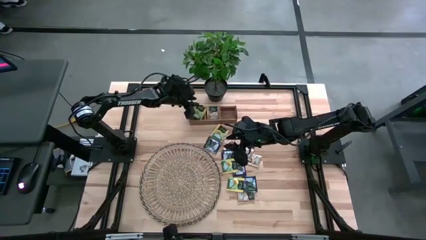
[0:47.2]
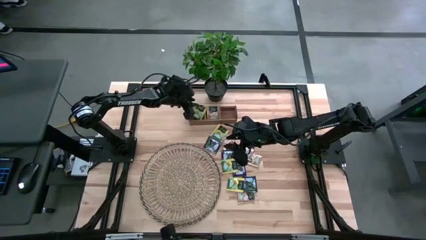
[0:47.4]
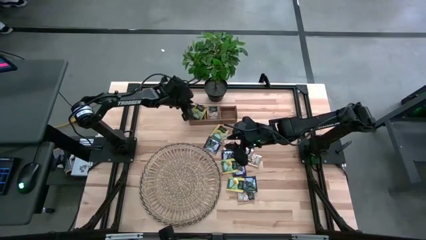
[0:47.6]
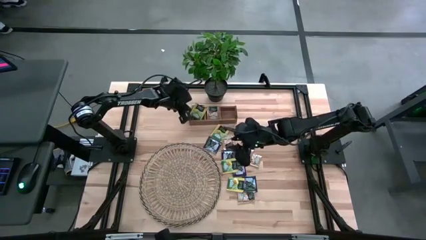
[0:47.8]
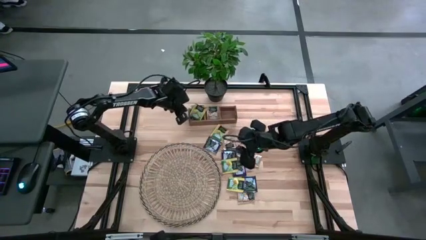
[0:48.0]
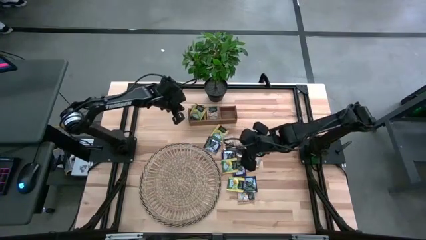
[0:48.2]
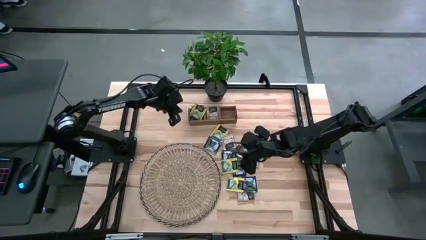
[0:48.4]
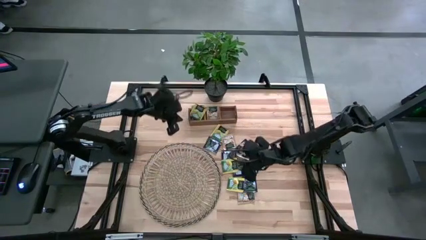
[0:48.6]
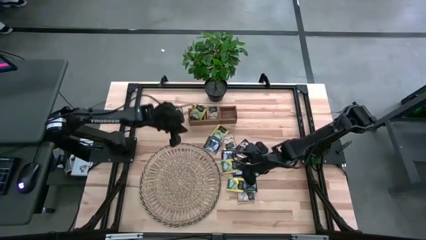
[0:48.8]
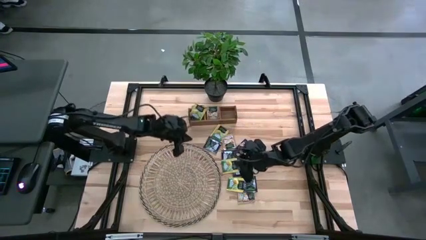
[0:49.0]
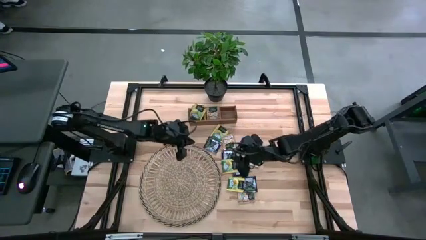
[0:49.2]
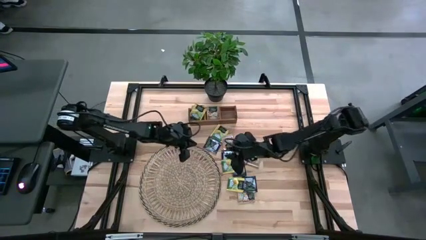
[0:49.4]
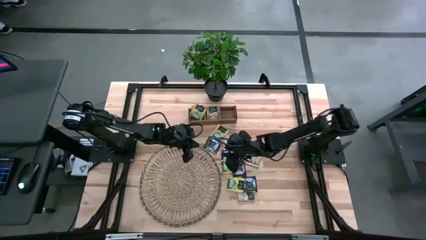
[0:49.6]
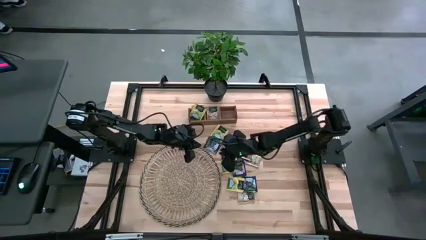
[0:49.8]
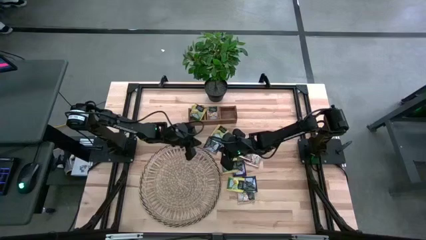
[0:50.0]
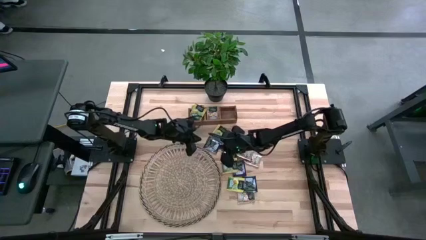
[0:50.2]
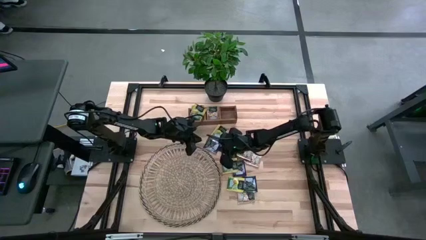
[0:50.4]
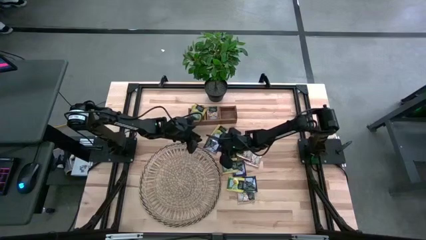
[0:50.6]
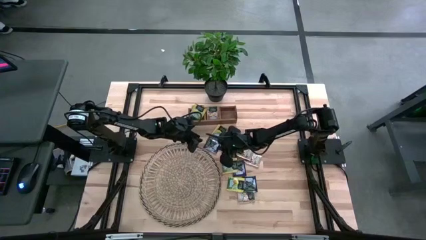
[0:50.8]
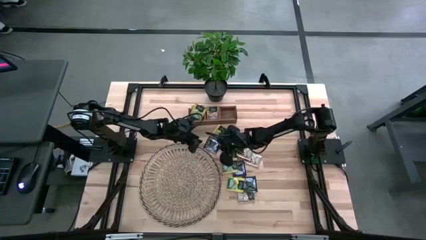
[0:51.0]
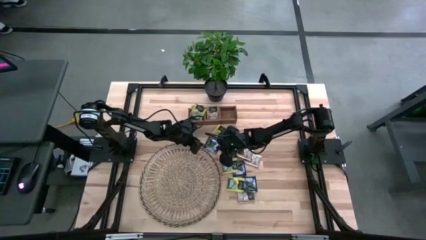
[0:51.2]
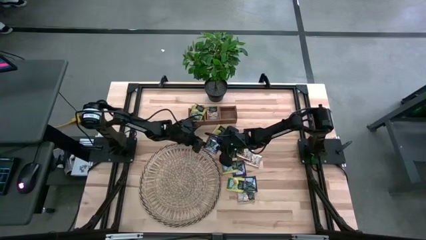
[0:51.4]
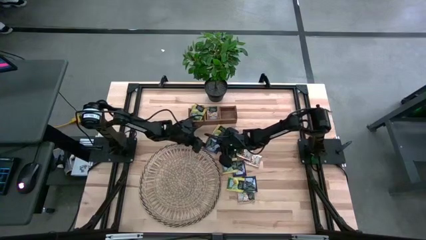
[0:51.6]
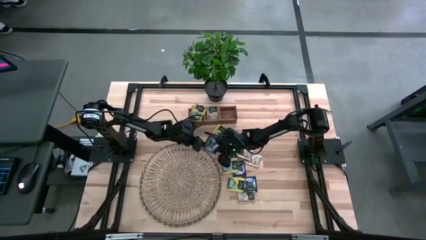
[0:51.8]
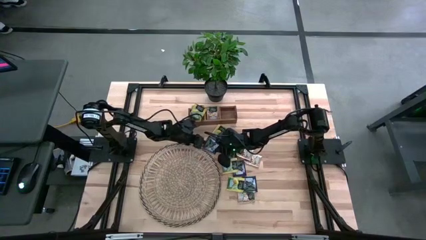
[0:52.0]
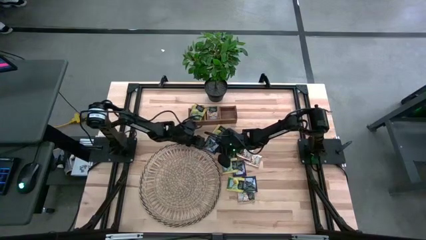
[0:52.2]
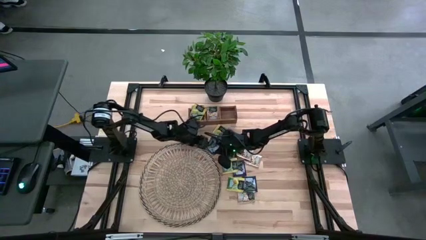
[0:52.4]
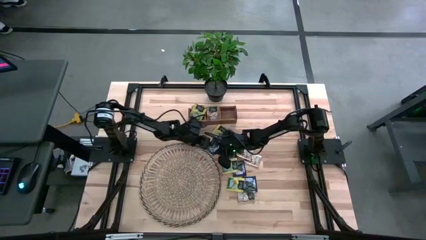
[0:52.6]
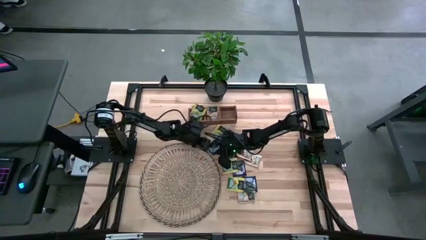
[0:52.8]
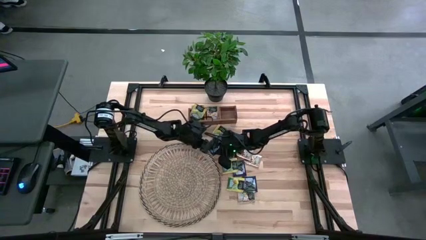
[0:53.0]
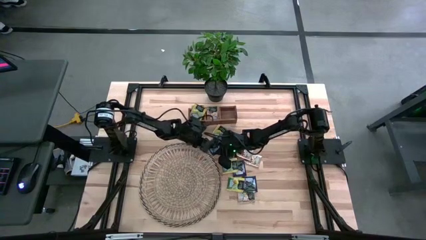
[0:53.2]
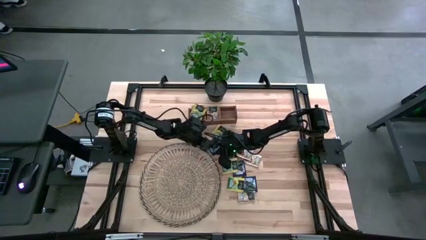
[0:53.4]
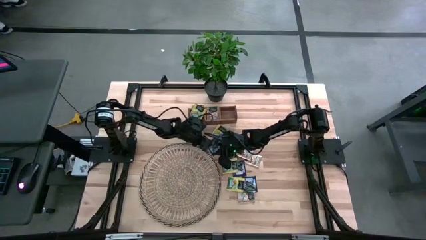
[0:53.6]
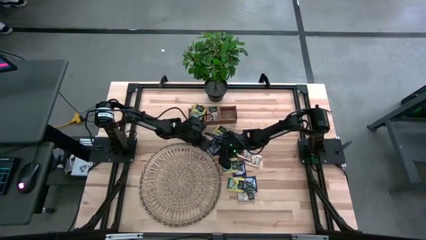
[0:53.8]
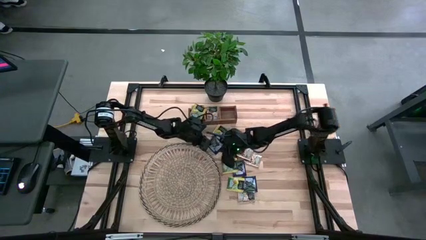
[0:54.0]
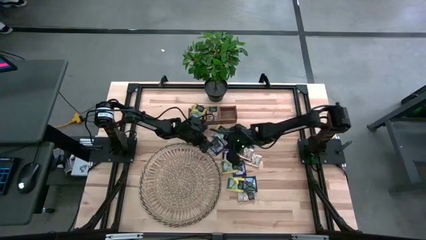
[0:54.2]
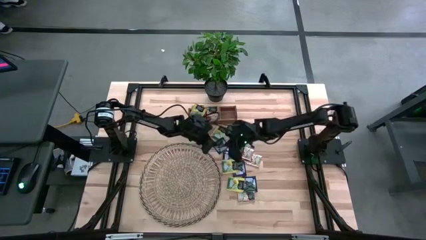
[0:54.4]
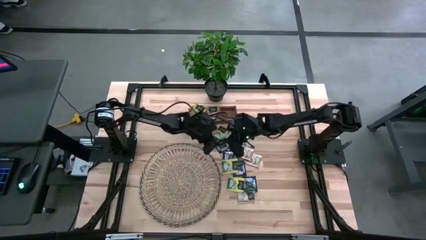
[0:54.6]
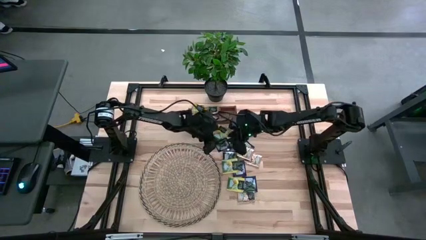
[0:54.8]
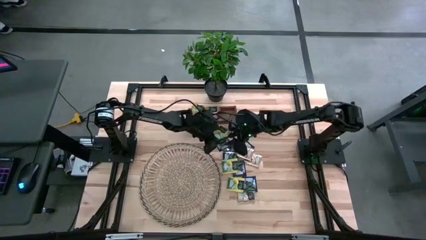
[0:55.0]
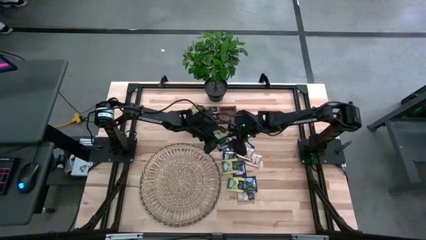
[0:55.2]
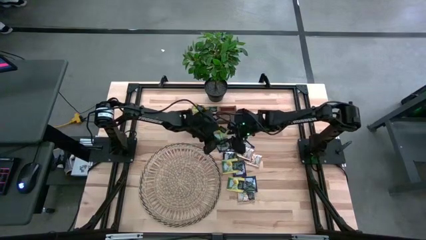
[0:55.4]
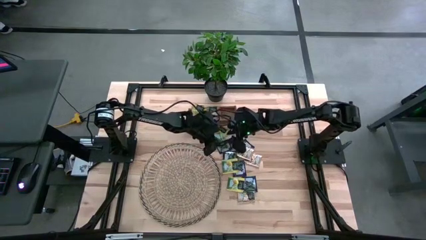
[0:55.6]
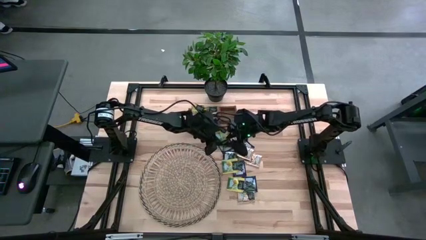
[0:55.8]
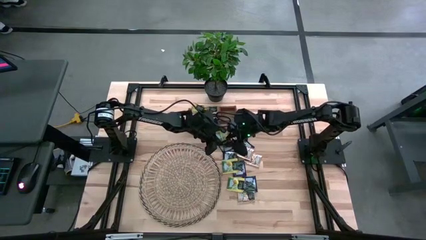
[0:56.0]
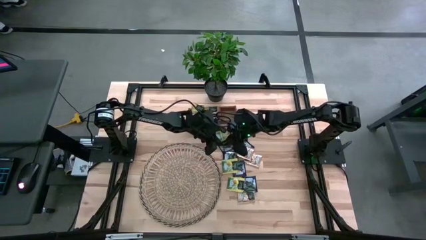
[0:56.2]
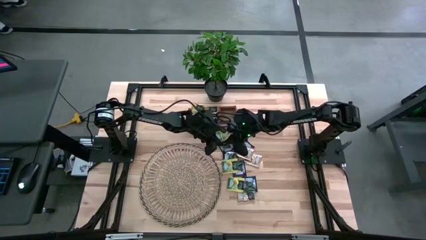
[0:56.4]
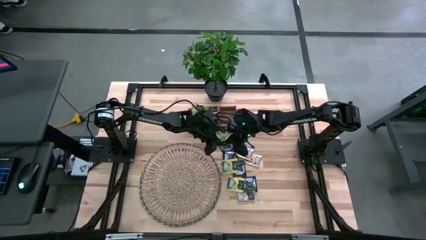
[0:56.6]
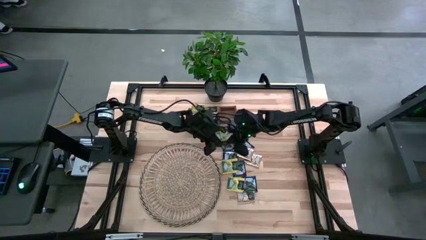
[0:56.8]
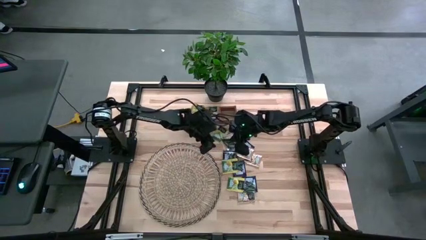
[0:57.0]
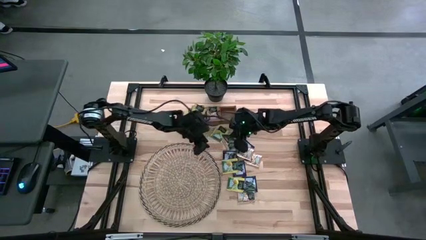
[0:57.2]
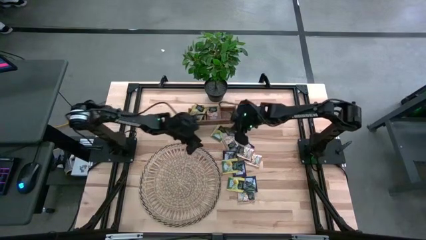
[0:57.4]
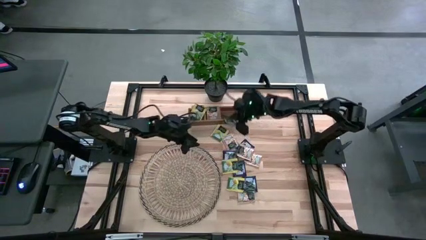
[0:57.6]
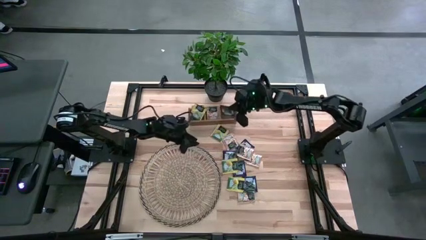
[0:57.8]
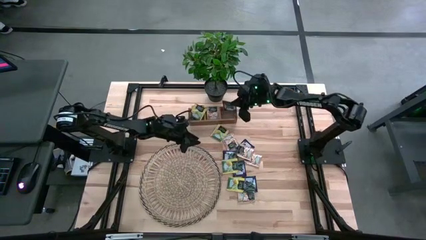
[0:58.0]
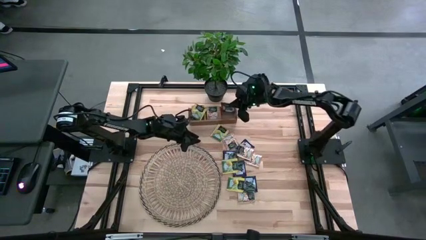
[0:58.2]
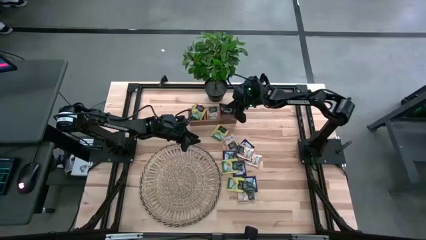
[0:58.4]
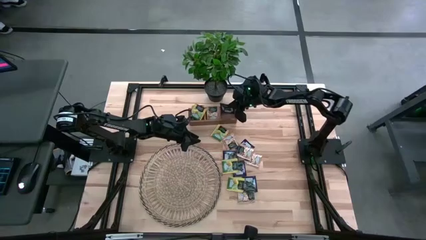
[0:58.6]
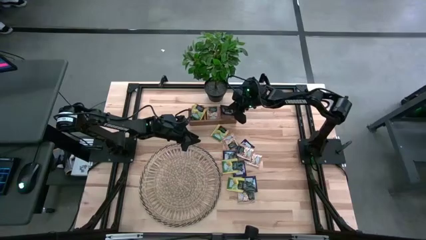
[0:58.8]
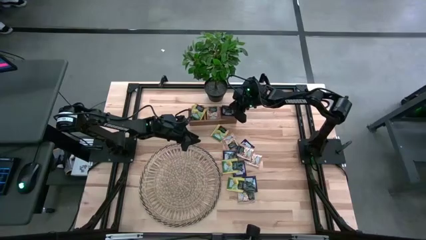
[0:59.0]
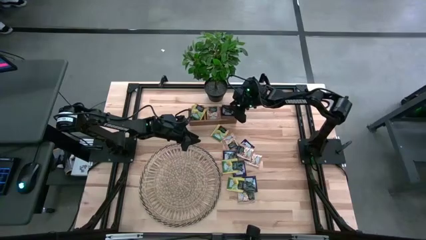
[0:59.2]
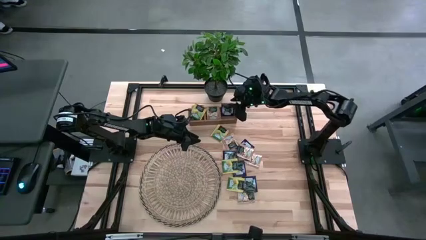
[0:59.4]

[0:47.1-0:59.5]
Task: Pick & Place Tea
Put the blue tea bag into the right section of the wooden organizer
